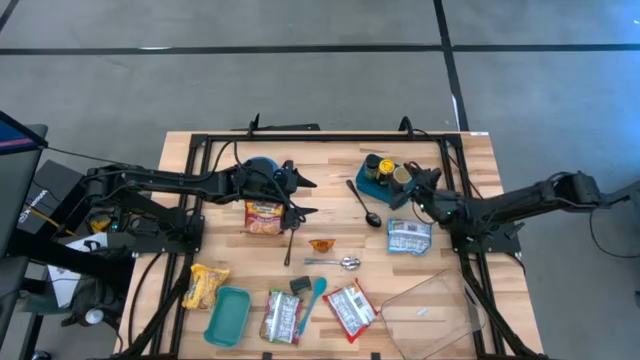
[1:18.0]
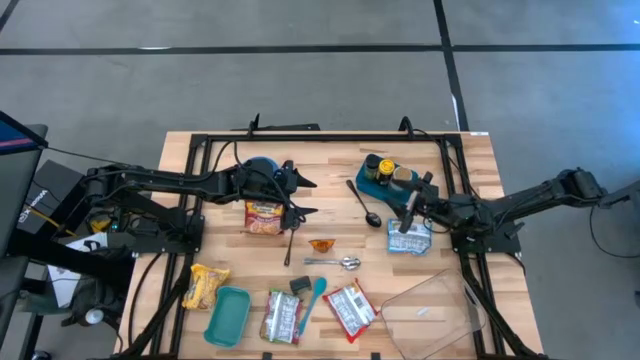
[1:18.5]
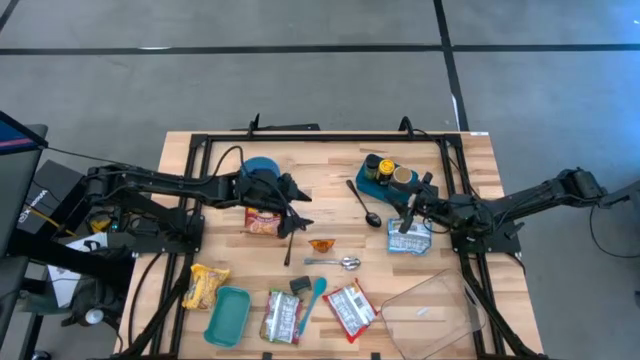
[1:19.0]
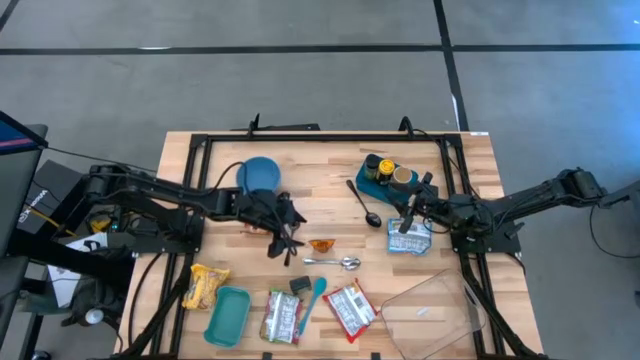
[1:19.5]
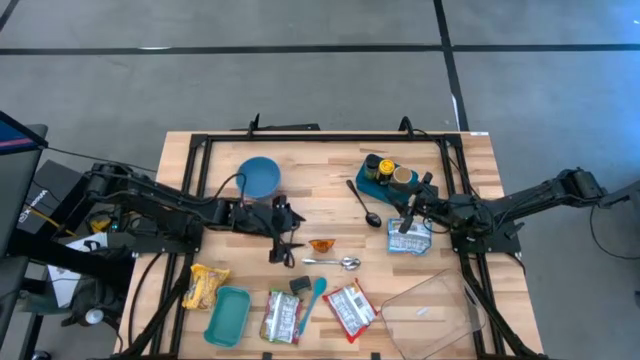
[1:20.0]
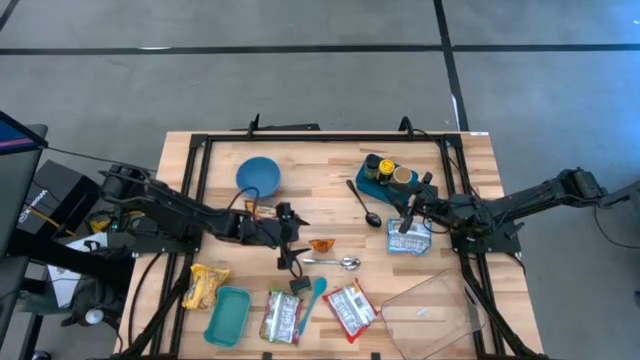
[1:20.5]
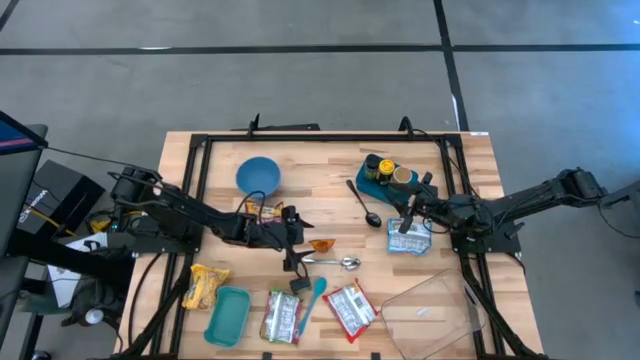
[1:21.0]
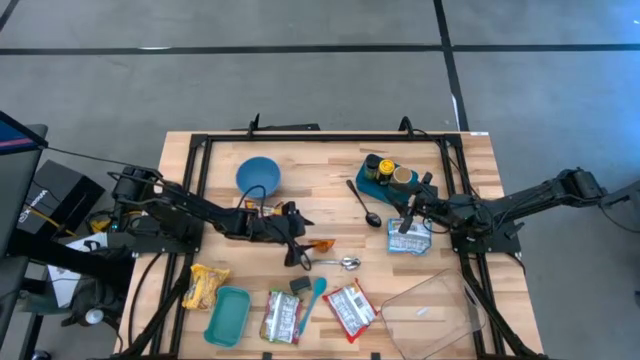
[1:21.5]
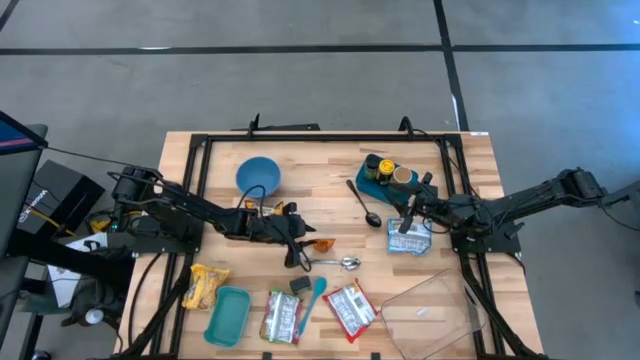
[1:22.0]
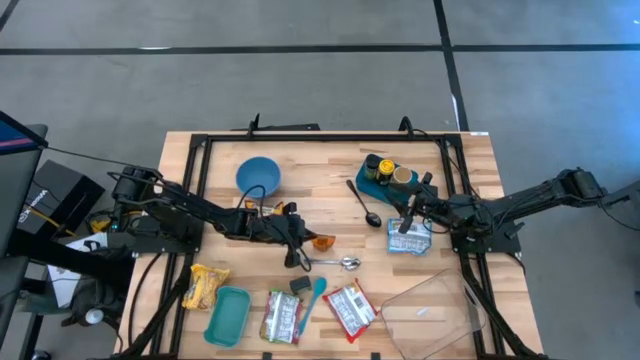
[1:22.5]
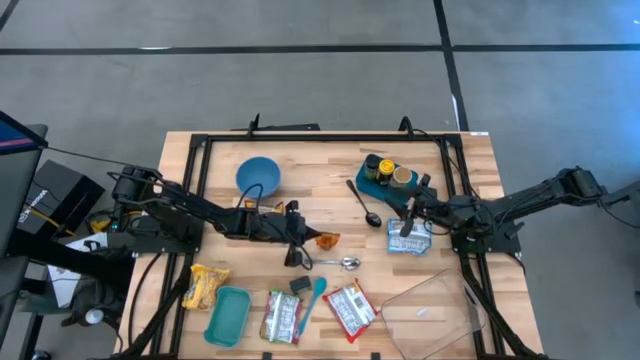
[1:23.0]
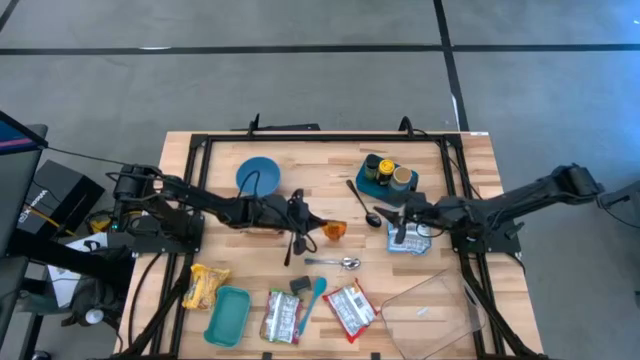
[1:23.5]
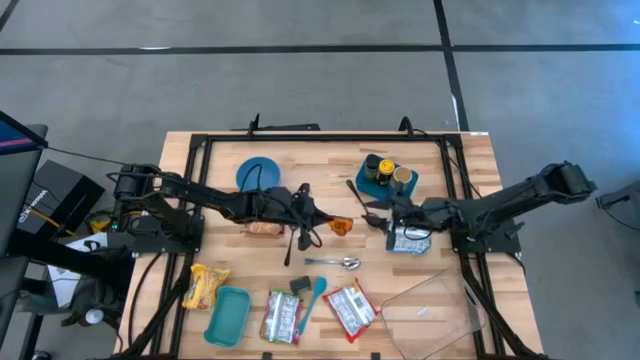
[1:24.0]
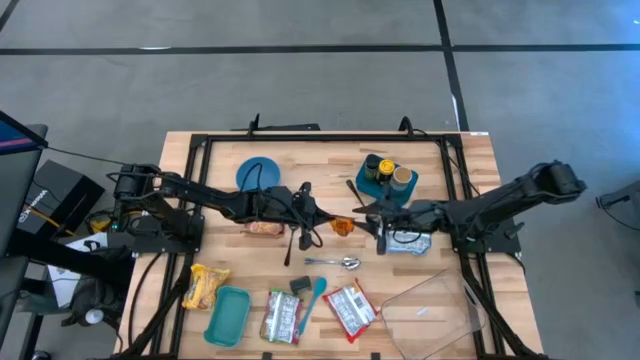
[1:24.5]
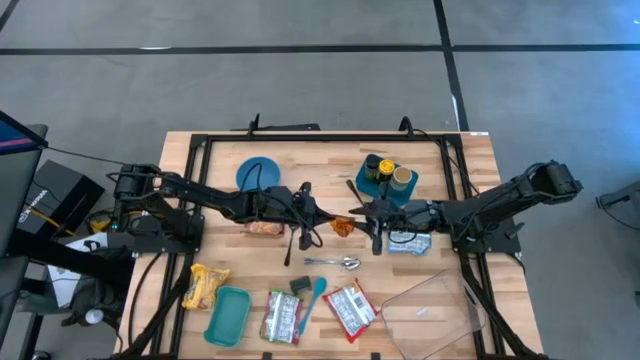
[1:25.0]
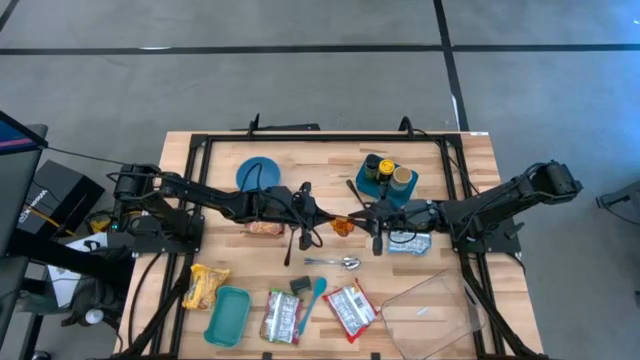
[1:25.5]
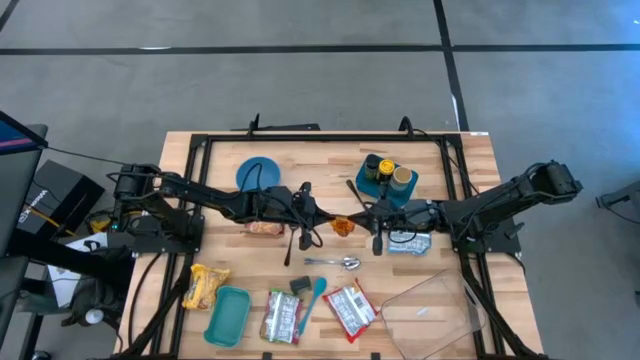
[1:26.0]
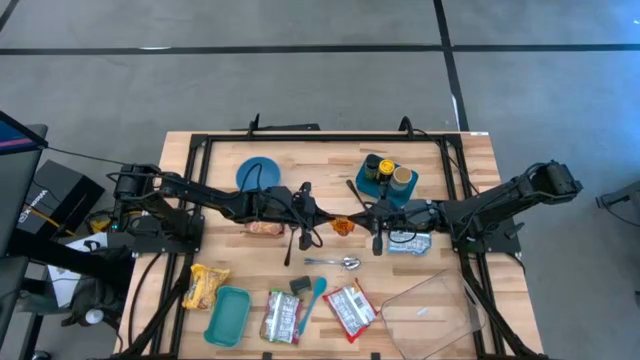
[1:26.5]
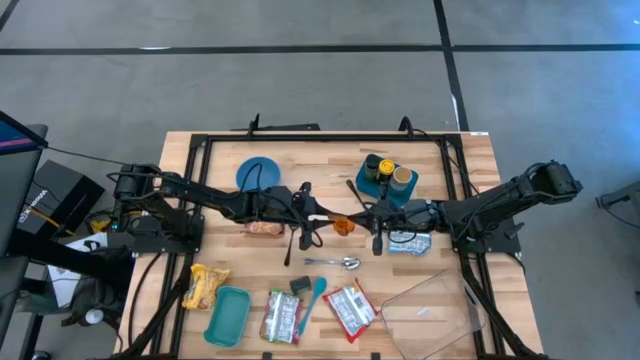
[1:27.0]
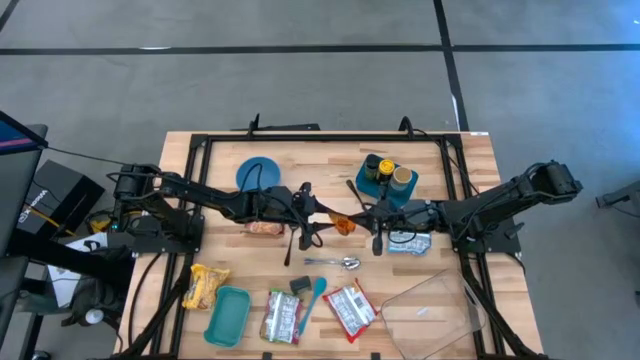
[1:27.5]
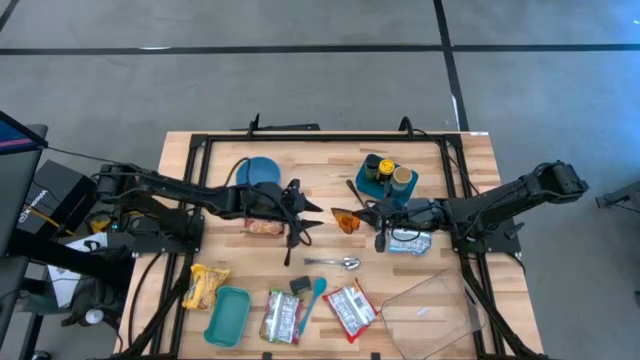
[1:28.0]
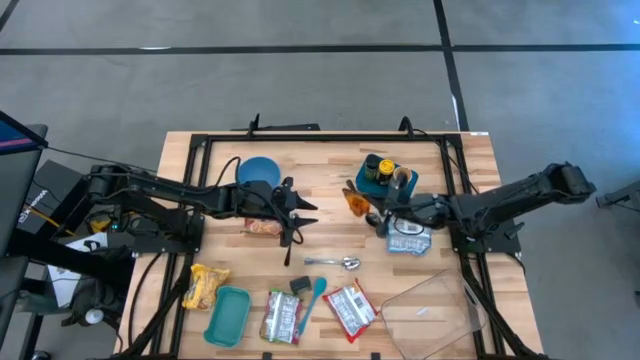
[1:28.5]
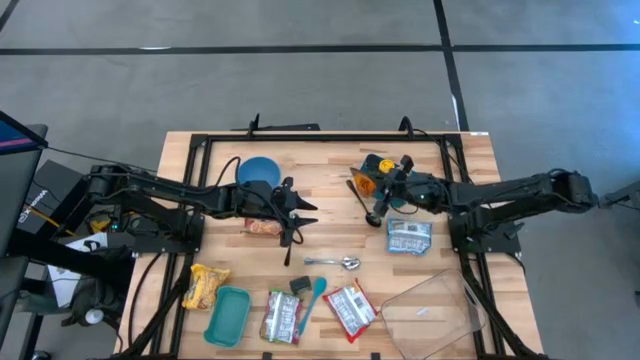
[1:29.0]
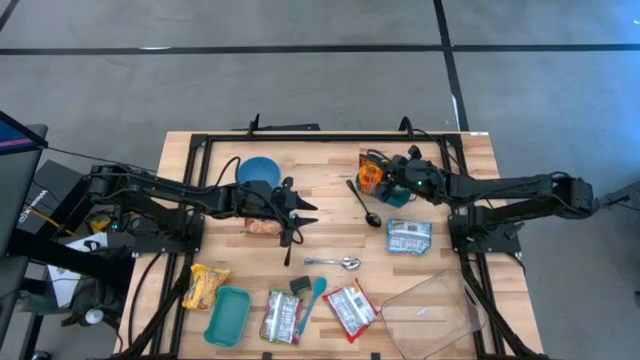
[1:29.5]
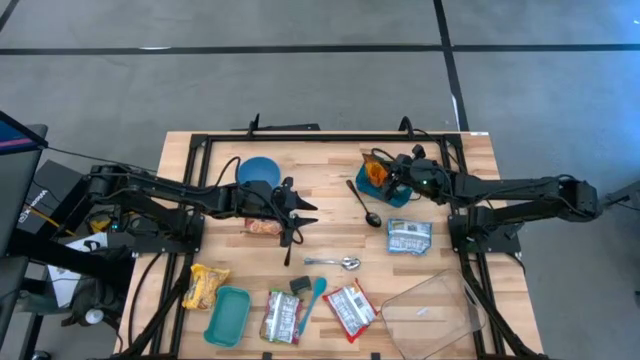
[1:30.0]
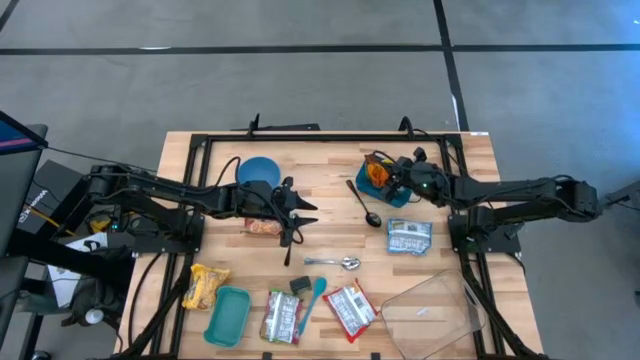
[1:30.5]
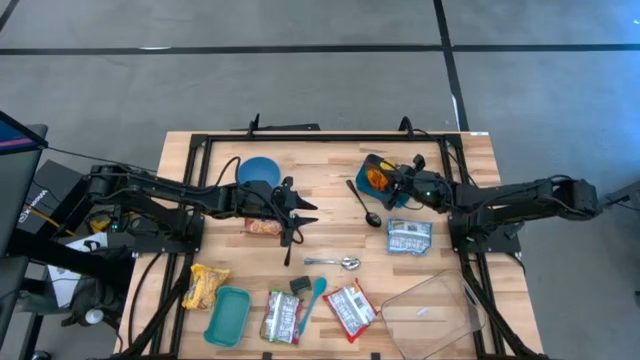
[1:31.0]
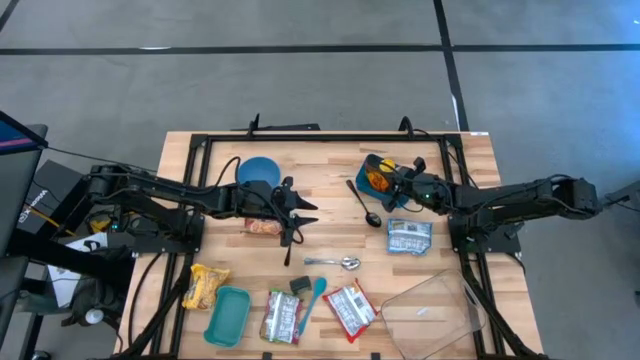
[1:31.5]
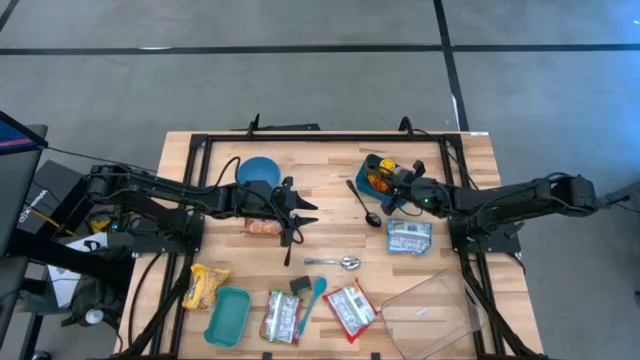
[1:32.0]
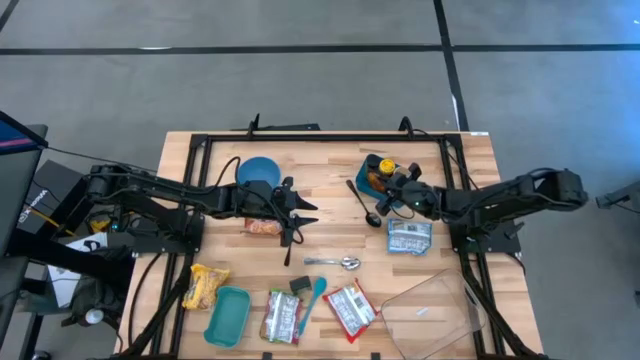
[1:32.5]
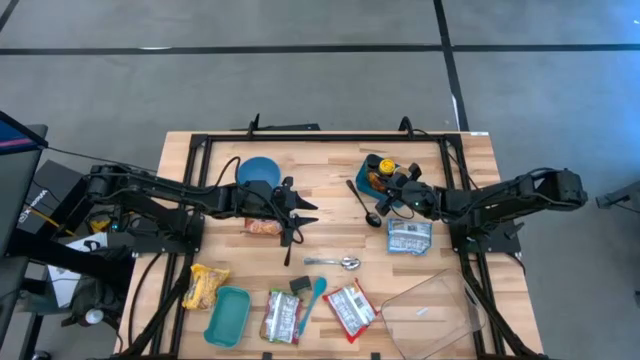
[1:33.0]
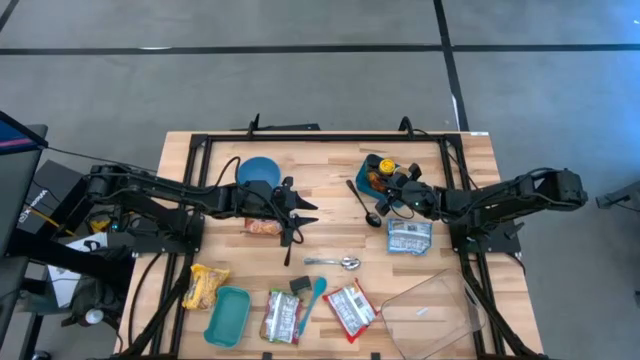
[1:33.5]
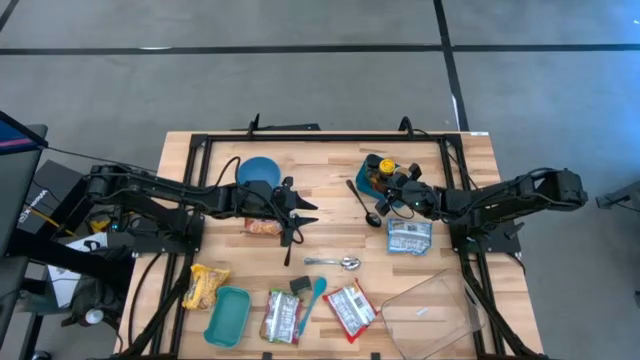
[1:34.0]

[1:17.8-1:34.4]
Task: Pick & Place Food Item
Put the orange seasoning bag into the blue bin

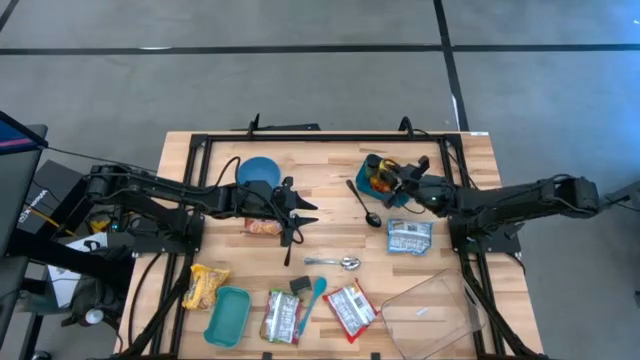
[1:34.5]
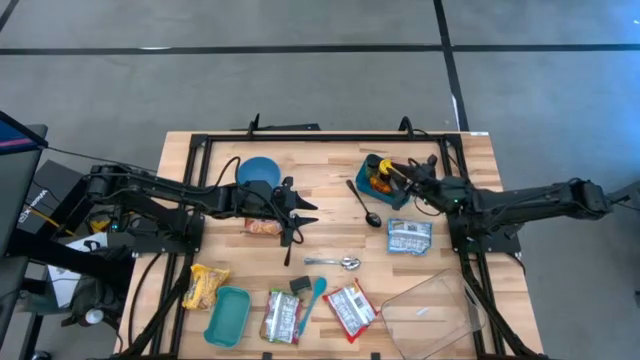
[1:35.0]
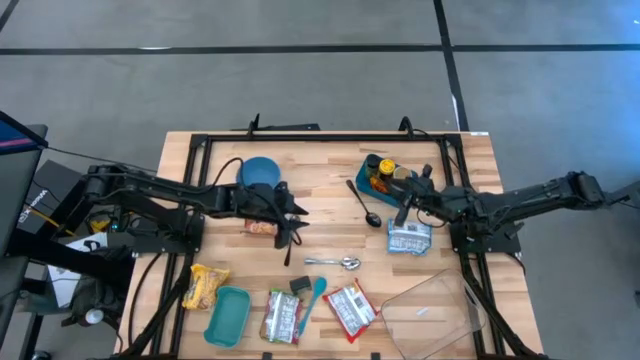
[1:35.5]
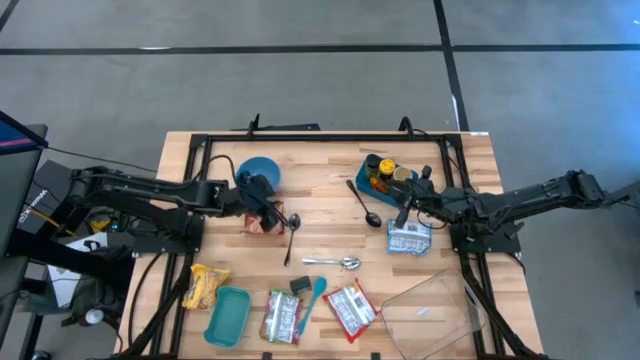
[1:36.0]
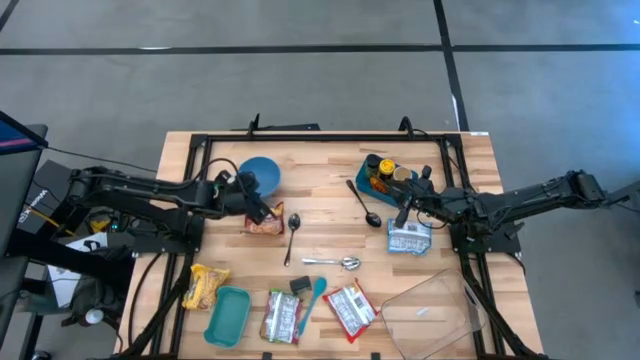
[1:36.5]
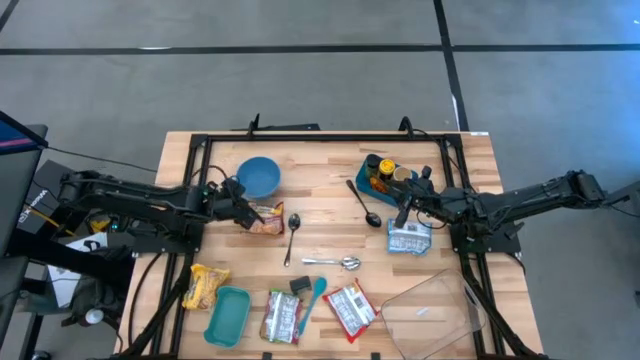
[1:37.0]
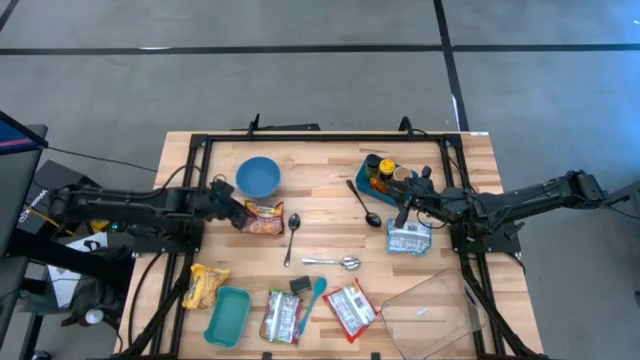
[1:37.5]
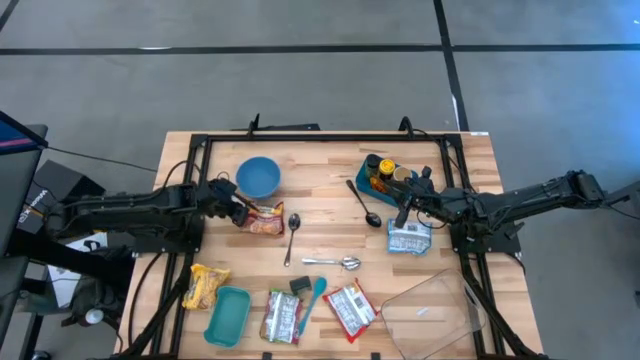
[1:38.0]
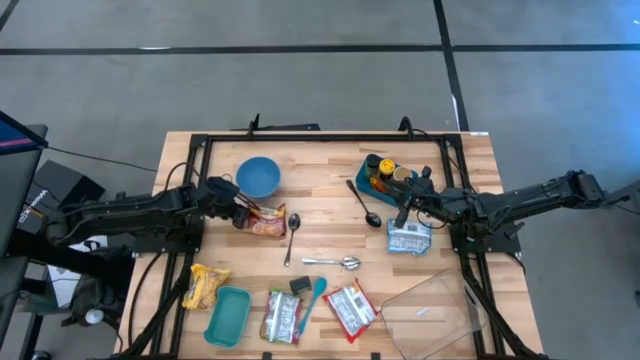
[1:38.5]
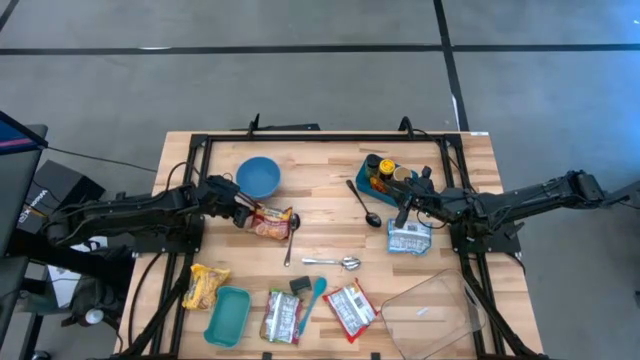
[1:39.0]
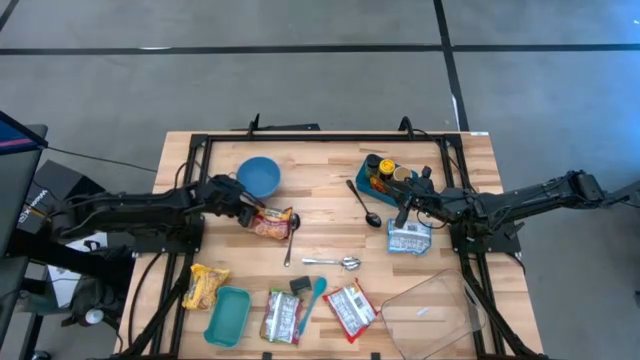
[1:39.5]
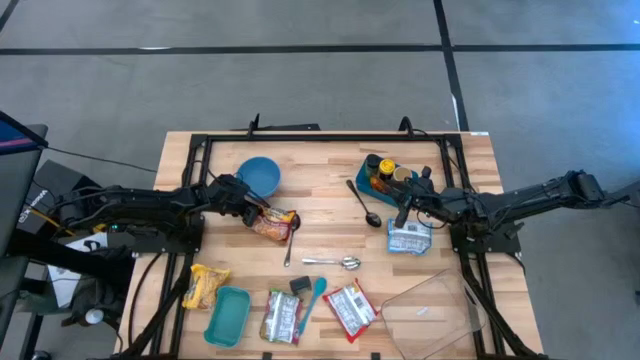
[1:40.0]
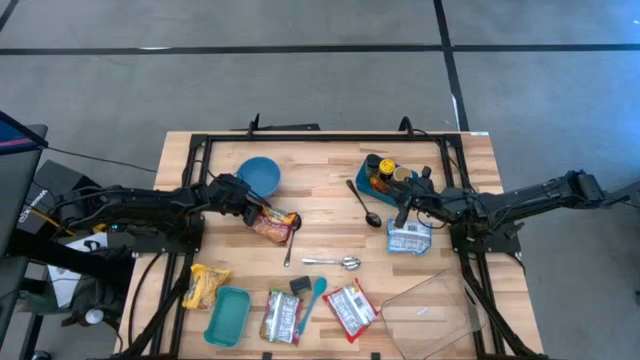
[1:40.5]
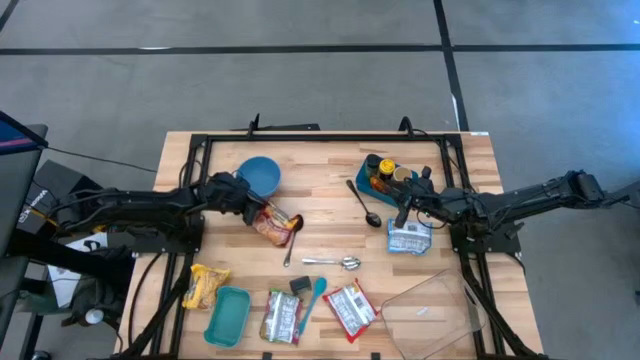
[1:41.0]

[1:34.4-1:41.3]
Put the top red noodle pack into the transparent bin
